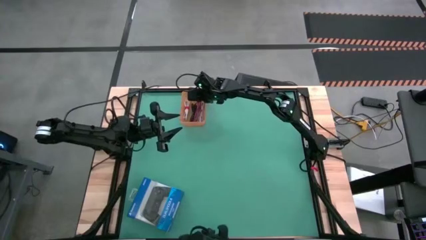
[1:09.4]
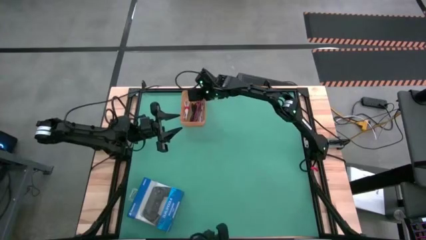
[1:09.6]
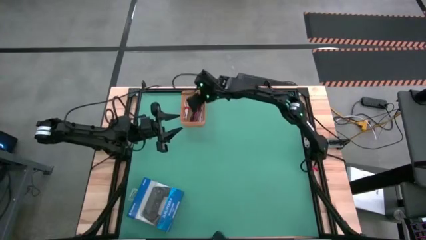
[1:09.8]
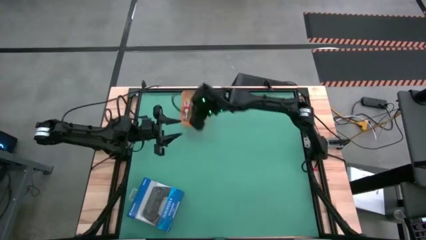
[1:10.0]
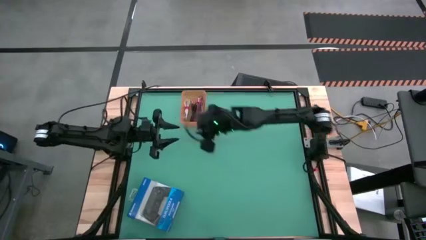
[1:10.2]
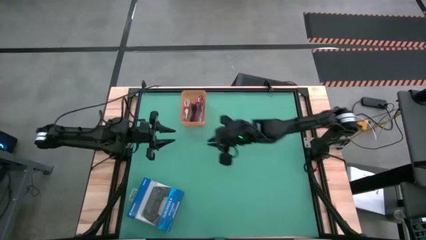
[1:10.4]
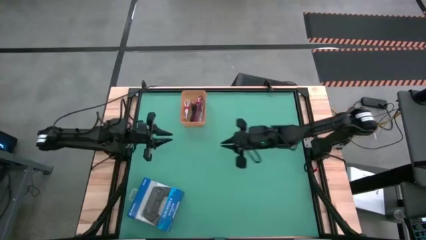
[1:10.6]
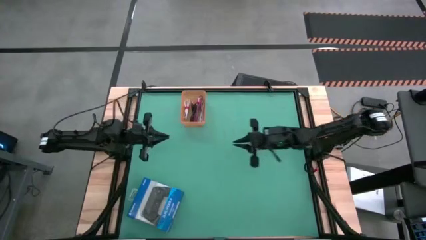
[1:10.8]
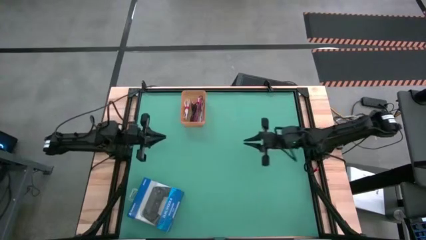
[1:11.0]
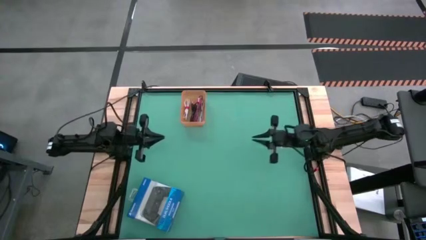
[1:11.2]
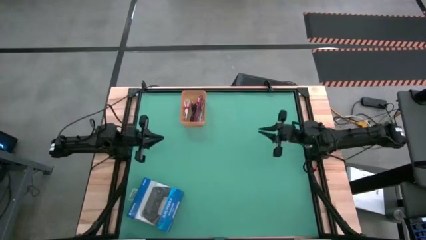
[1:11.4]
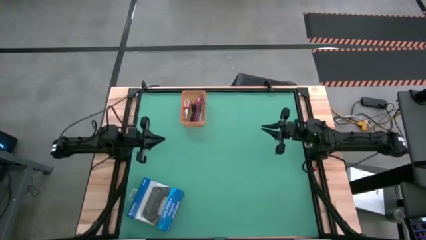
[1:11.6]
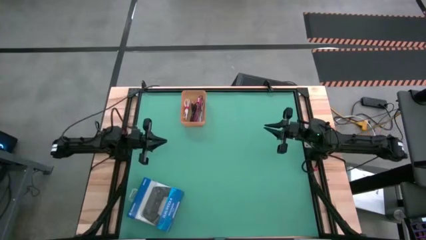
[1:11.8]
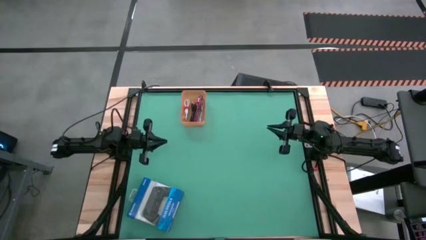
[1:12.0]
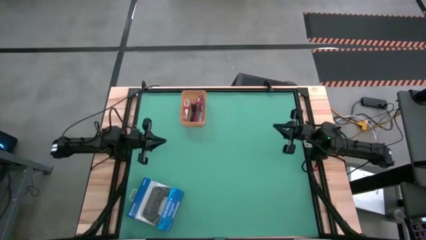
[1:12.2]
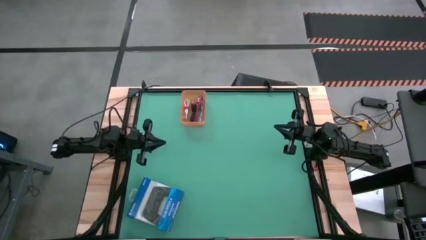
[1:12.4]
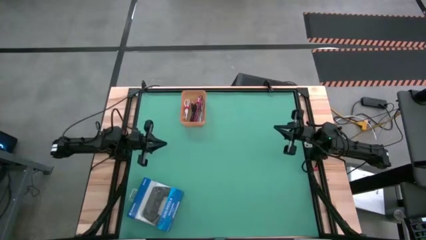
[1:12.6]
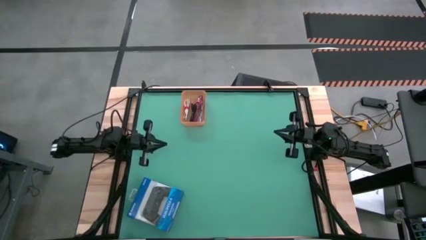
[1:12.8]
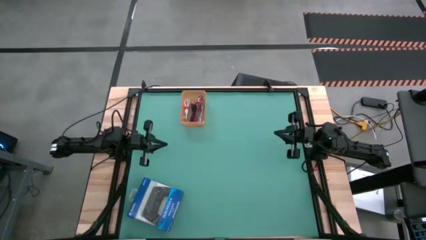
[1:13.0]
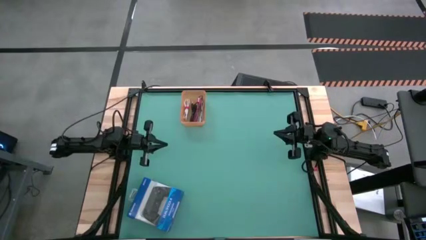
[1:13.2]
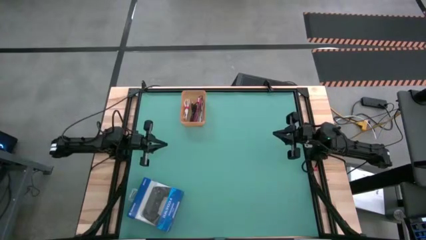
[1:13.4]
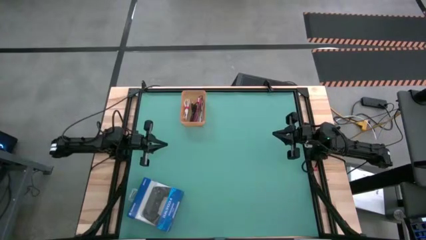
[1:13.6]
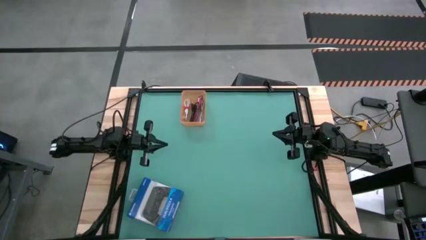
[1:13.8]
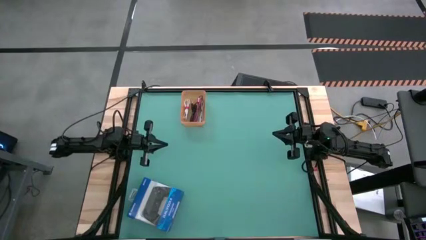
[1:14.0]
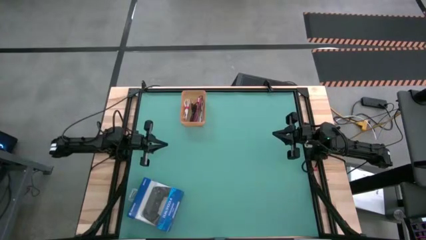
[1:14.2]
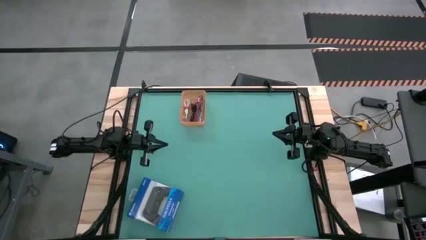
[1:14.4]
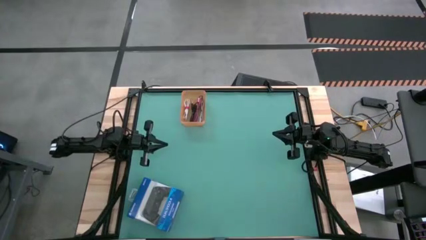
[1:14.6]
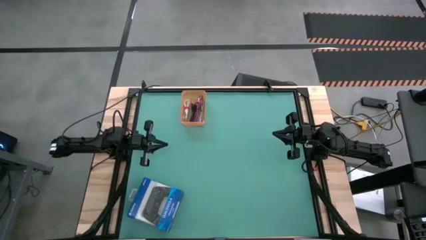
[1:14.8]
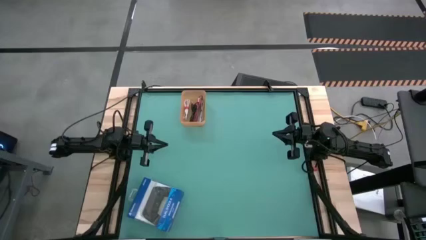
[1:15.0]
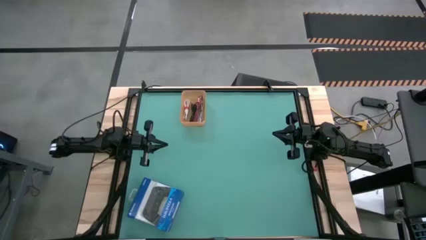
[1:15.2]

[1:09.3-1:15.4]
Task: Pick and place USB-C Cables
Return to Home Position

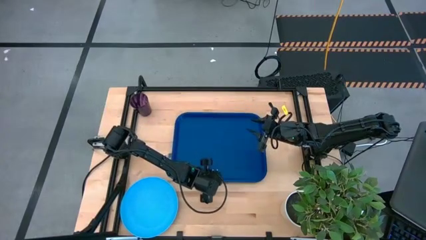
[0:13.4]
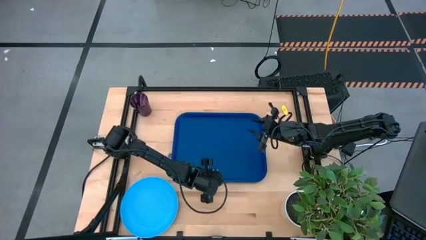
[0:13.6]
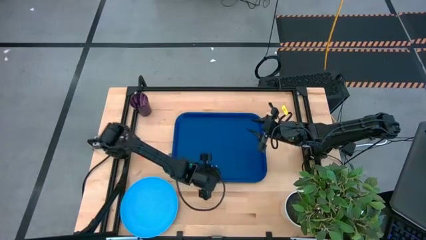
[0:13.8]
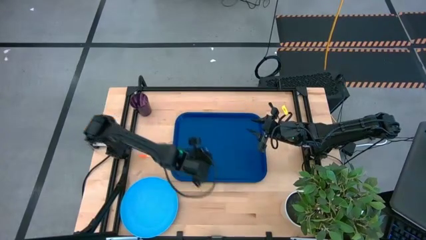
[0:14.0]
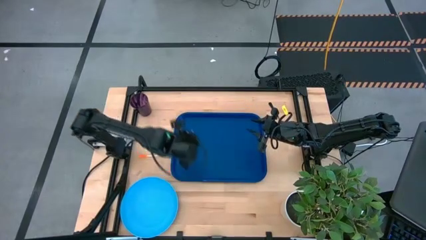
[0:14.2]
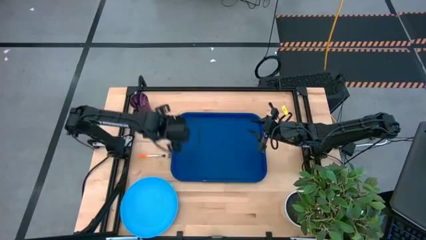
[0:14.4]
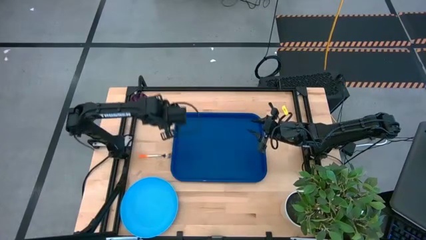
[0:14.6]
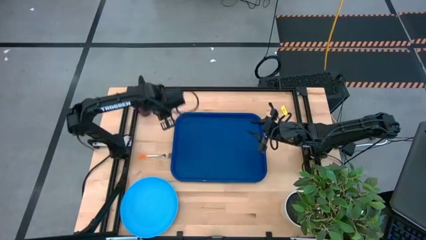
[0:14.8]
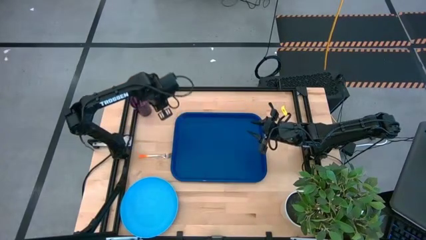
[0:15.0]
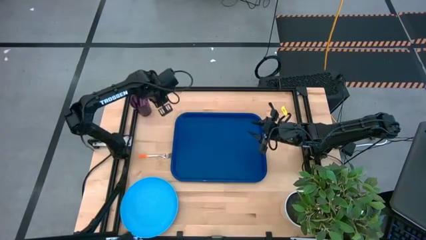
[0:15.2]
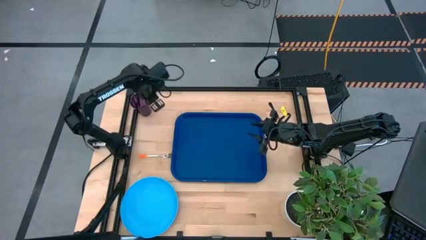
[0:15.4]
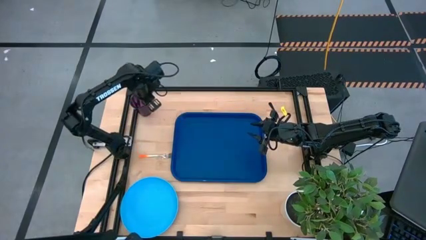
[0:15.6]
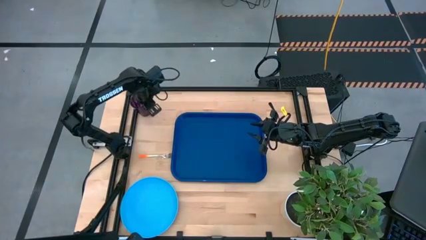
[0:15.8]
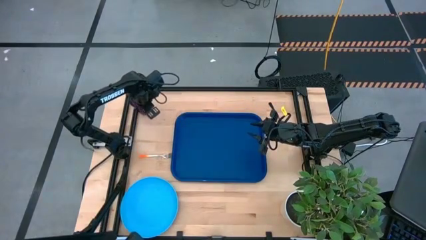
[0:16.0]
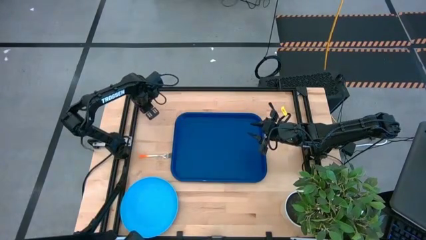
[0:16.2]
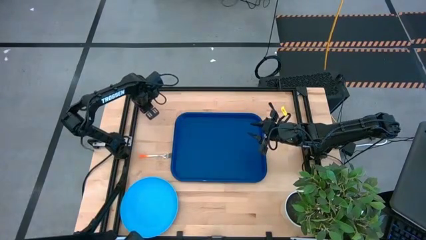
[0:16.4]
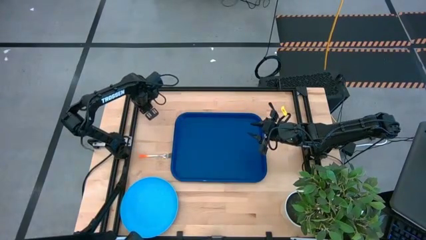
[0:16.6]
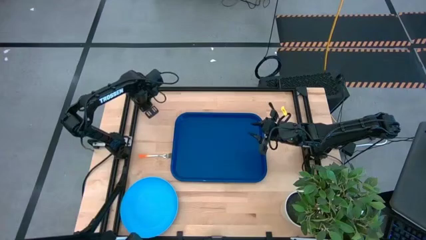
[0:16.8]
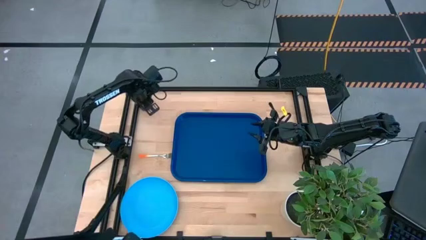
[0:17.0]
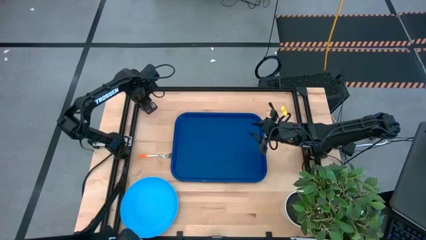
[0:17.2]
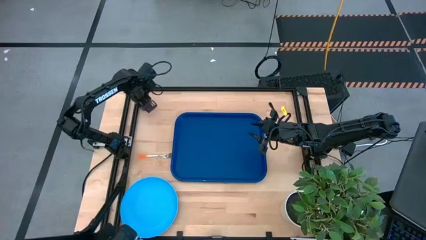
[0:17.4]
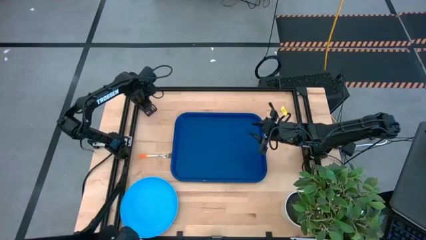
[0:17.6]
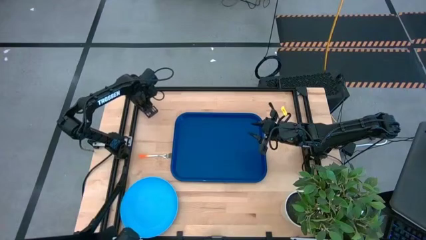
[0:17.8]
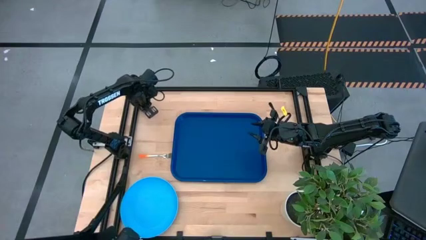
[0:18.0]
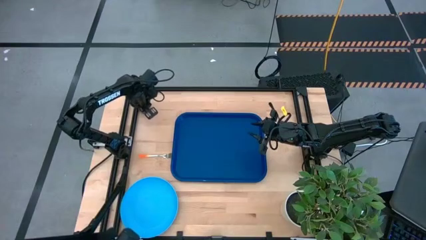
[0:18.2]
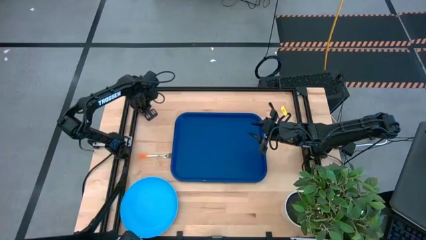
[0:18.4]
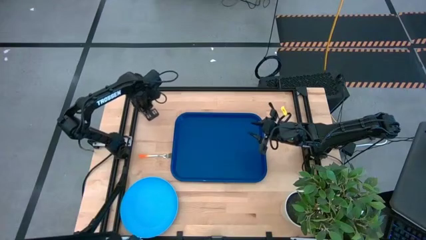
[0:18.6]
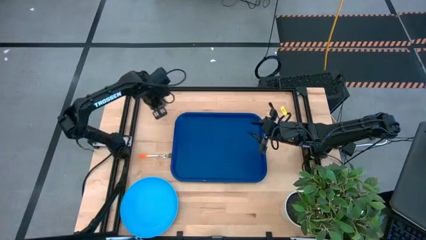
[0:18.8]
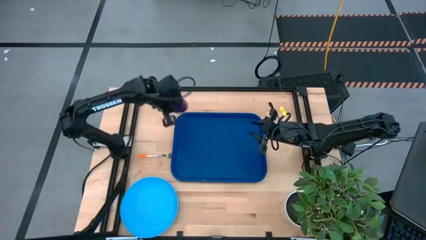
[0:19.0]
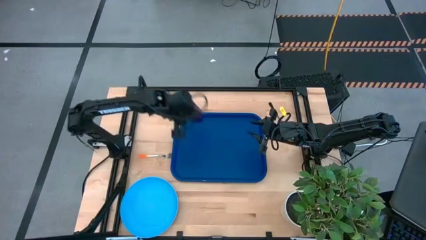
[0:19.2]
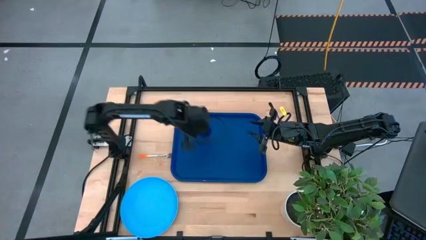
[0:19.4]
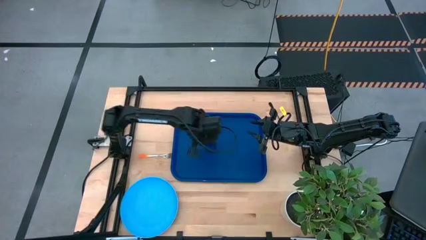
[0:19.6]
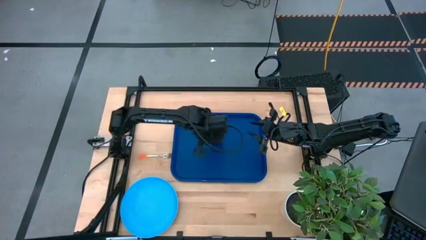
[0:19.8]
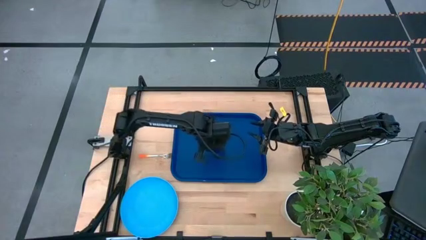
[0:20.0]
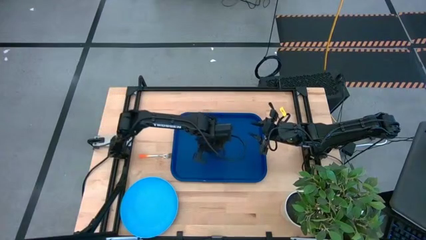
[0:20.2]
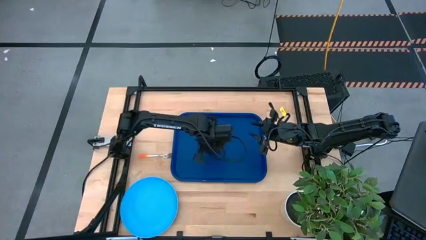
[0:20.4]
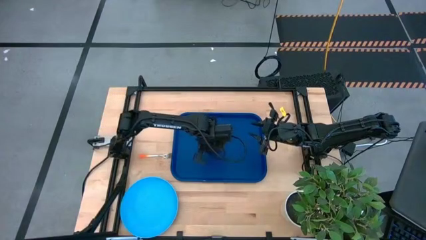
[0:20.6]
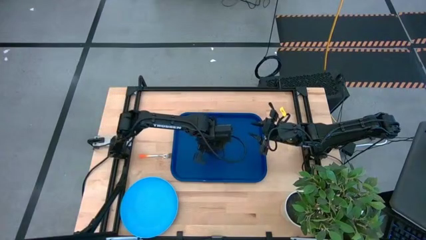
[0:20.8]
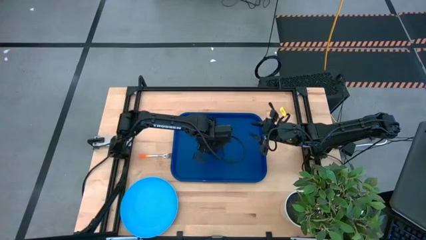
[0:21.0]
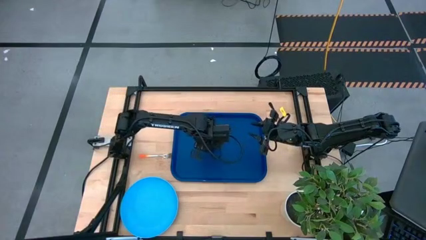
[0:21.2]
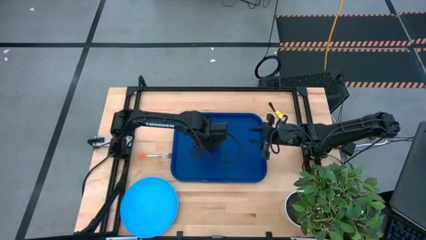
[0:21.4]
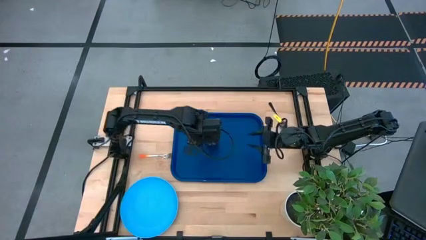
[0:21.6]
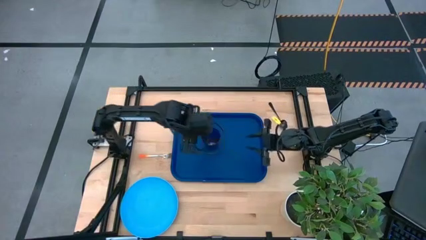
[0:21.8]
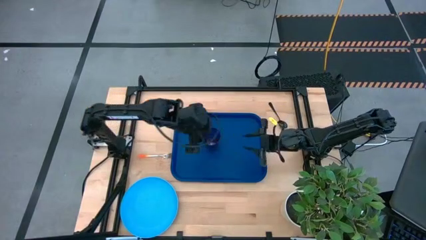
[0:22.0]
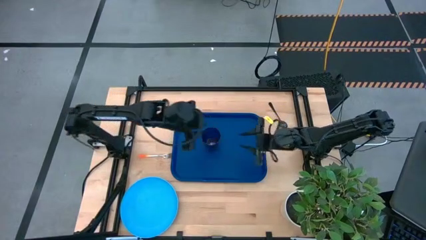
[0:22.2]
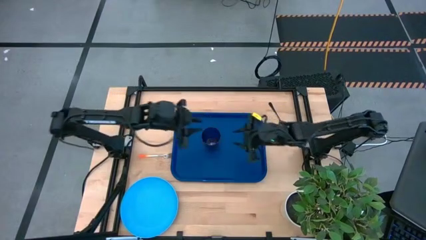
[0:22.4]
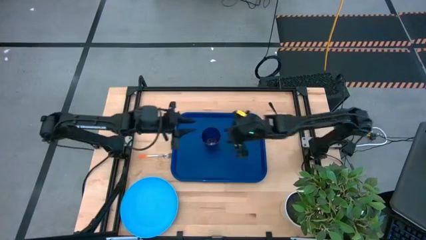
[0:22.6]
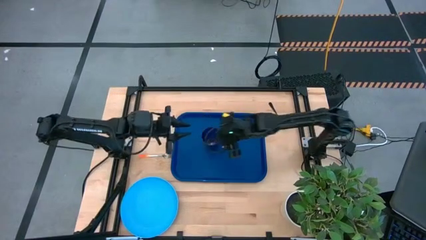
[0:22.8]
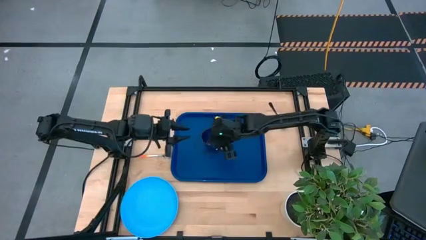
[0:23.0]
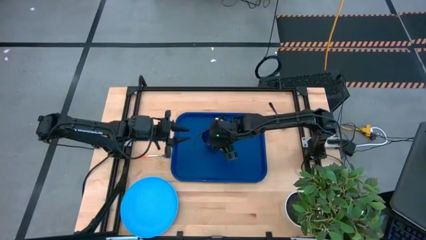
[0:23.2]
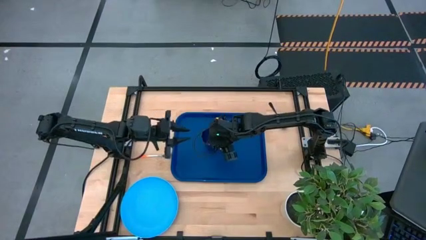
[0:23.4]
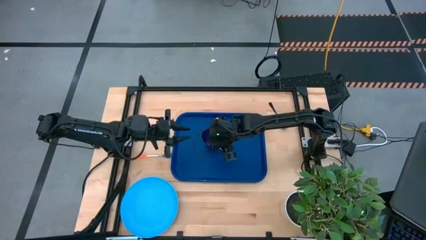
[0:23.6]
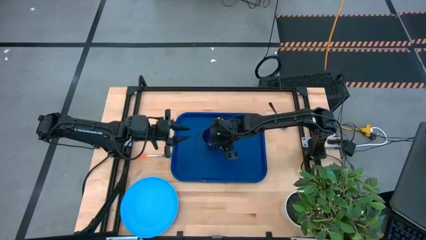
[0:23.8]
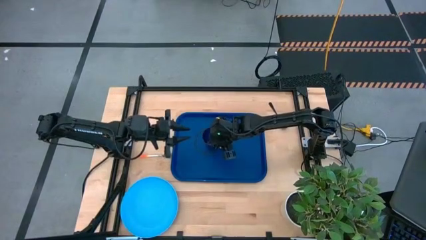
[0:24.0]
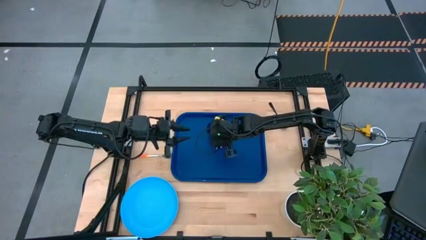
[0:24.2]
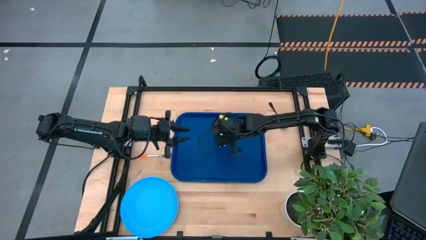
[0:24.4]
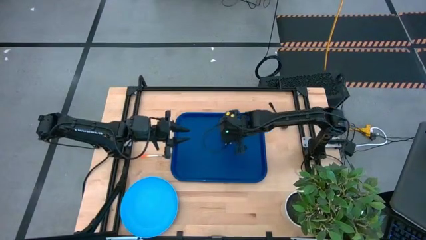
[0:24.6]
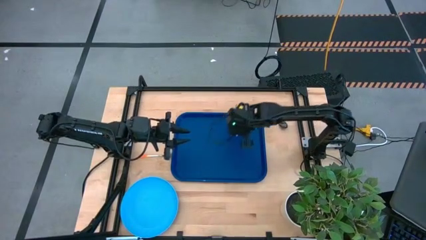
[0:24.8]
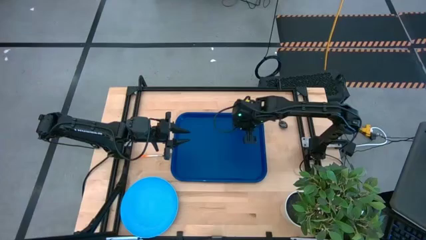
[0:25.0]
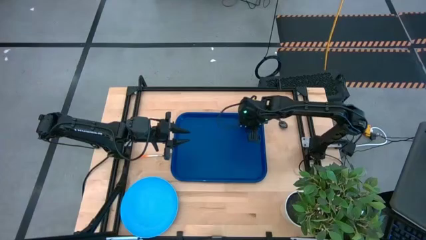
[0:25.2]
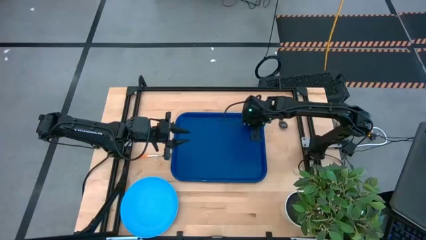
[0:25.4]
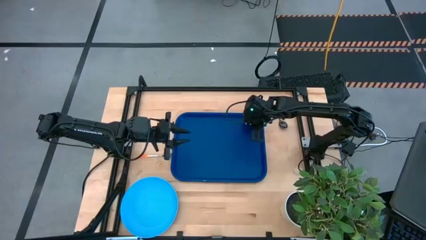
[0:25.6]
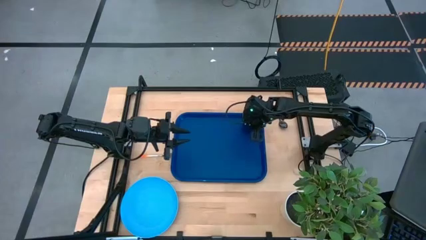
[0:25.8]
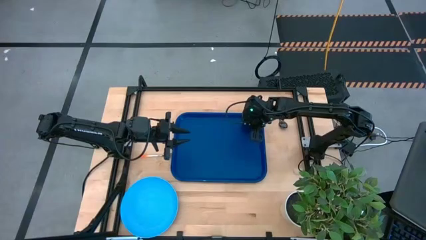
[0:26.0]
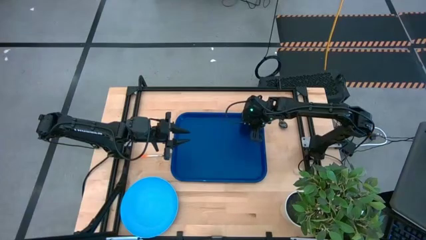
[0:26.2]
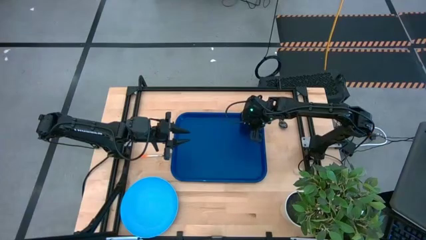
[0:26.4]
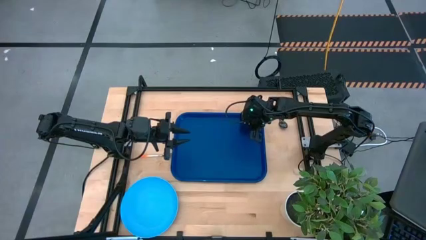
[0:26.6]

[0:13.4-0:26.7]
Task: Pick and place plate/cup/fork/spoon on tray
Put the violet glass on the top right of the blue serving tray
